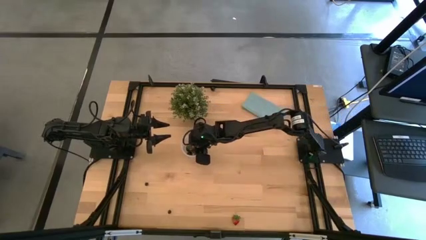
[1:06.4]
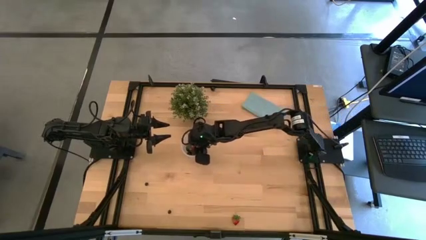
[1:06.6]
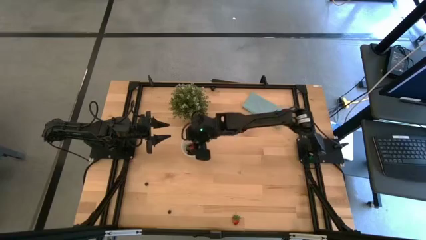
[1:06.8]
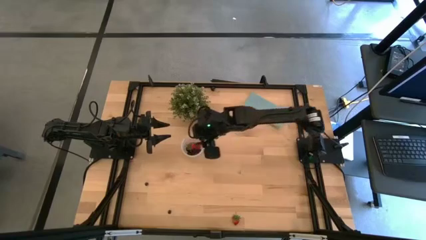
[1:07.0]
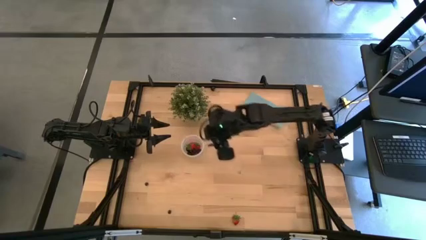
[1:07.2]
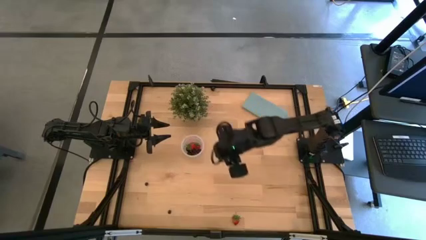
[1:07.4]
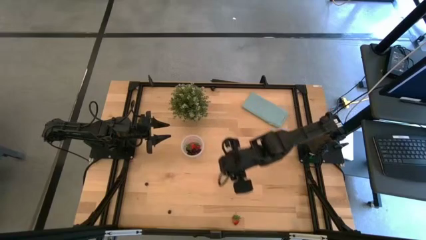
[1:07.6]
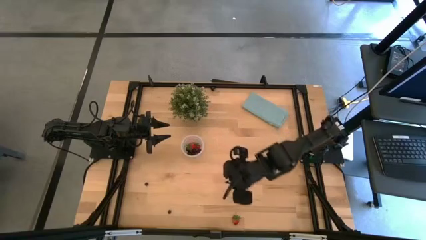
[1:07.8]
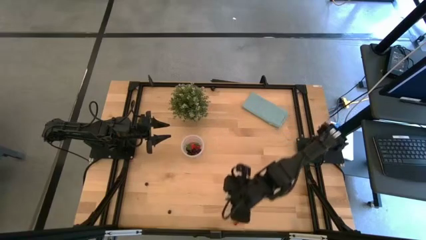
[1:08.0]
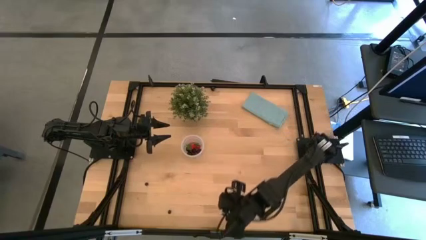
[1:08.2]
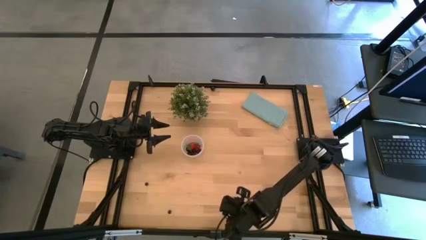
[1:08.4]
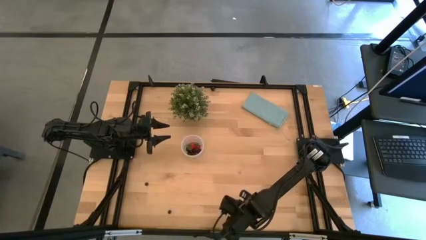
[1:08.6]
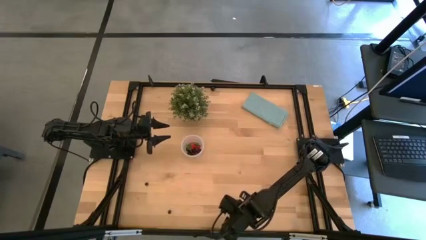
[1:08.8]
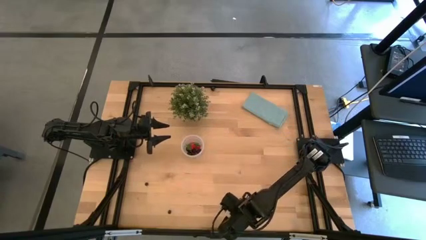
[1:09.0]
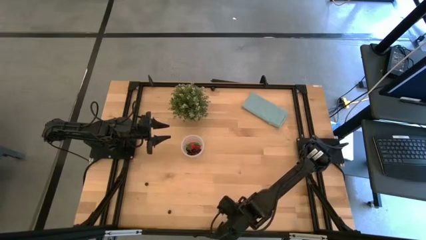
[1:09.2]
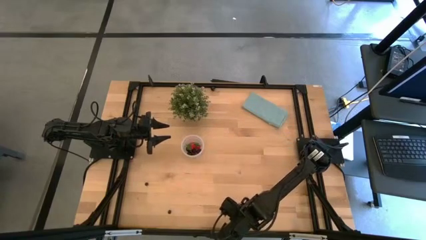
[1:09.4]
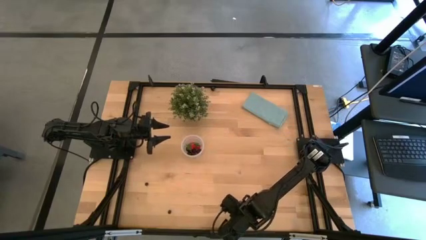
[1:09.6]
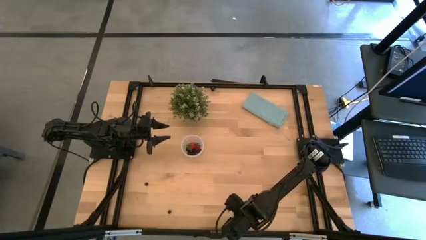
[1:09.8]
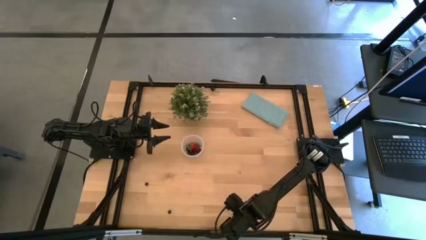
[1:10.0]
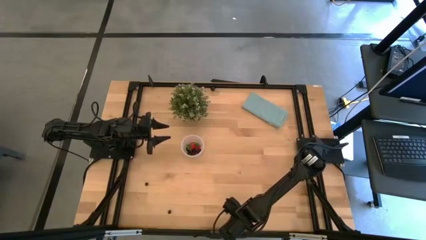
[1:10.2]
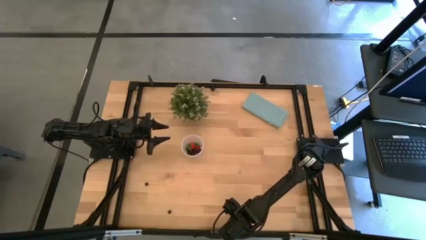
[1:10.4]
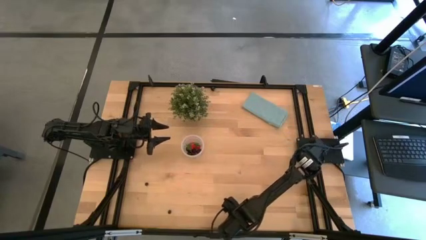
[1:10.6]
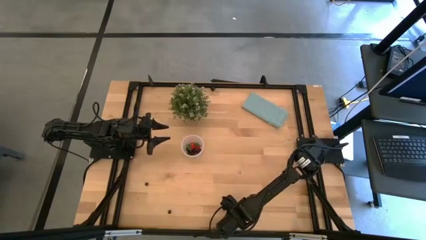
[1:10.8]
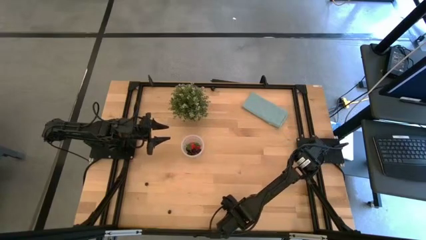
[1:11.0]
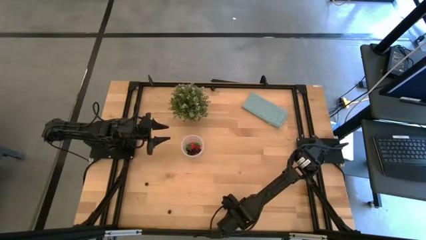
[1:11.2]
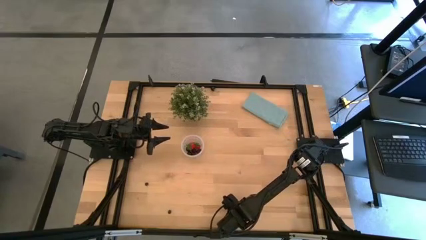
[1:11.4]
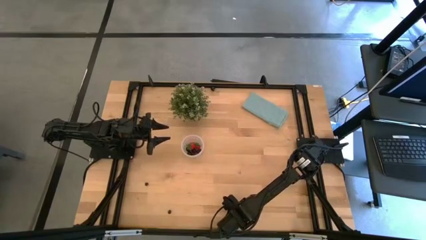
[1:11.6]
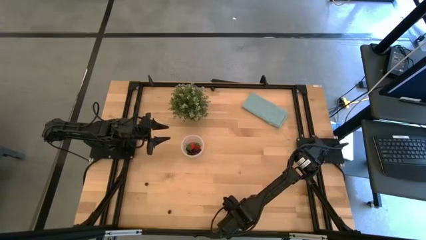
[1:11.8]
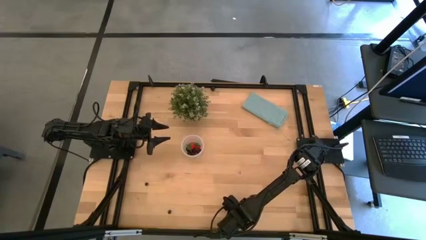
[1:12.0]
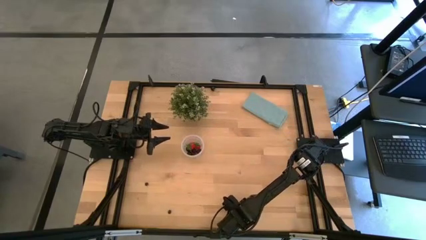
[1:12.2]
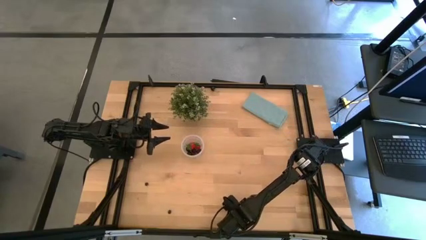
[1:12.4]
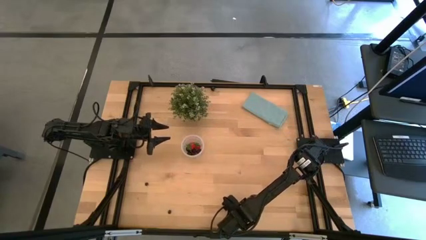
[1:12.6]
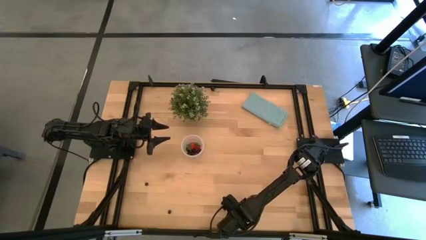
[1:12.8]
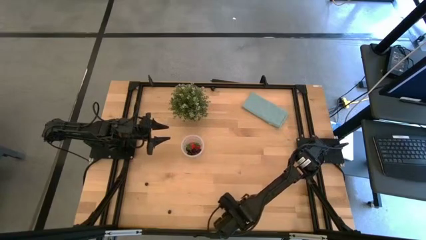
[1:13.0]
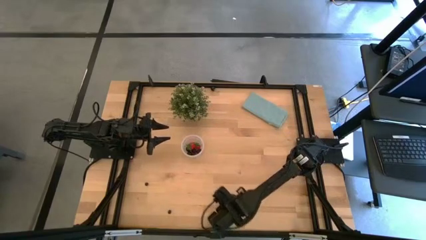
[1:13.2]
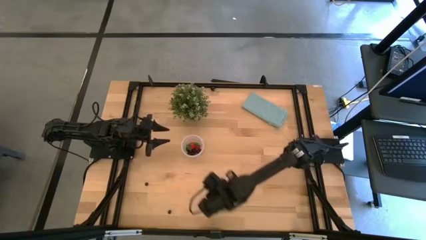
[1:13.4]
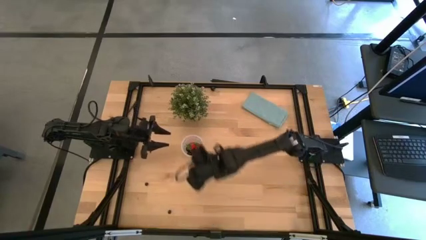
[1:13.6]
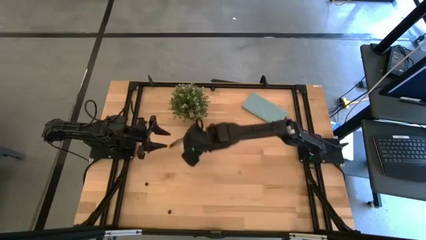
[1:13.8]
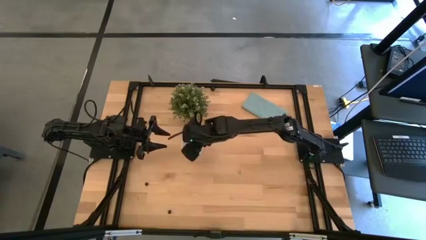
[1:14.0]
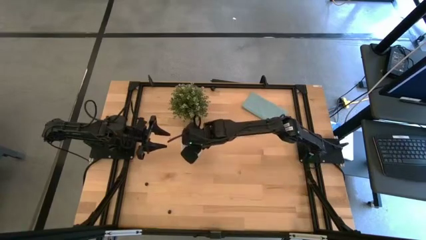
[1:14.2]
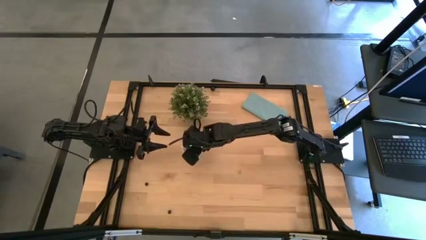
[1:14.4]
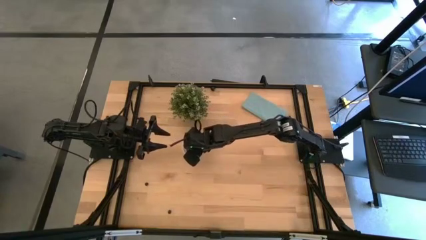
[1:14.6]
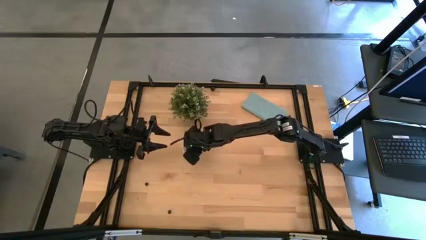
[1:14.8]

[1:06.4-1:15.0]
Task: Pick and placing Produce into tupperware
Put the red strawberry into the transparent container

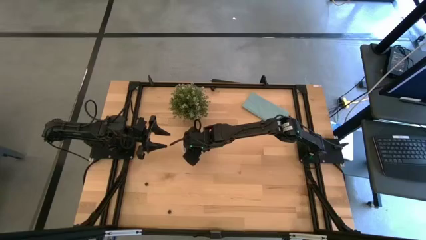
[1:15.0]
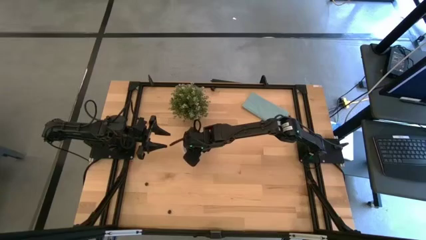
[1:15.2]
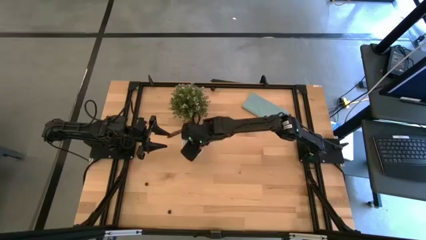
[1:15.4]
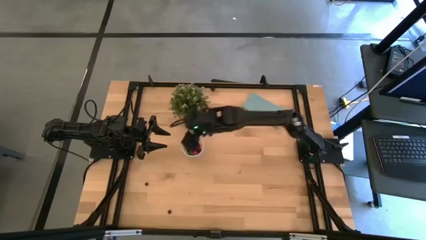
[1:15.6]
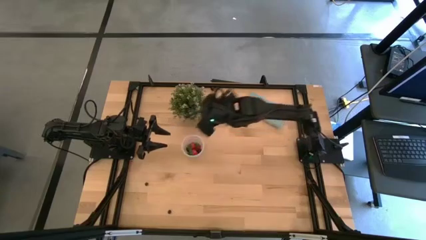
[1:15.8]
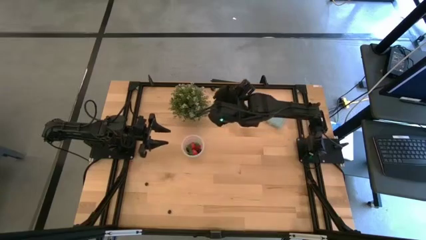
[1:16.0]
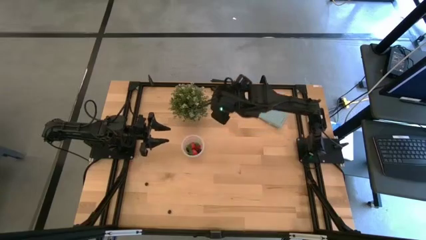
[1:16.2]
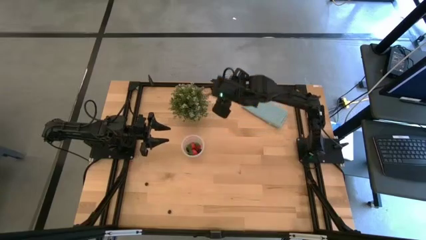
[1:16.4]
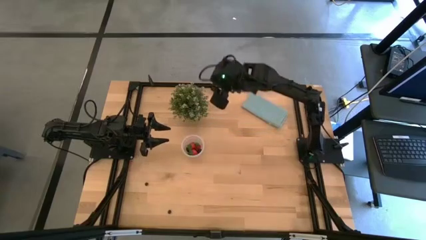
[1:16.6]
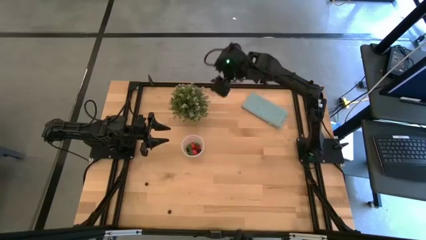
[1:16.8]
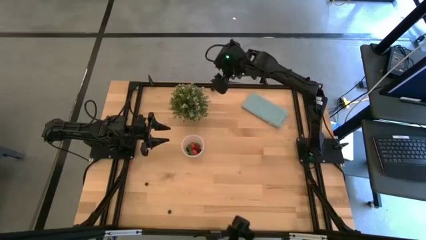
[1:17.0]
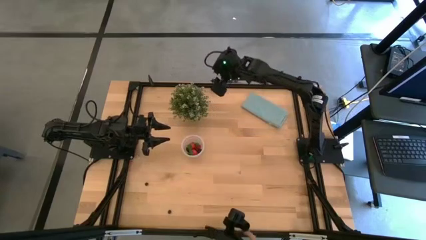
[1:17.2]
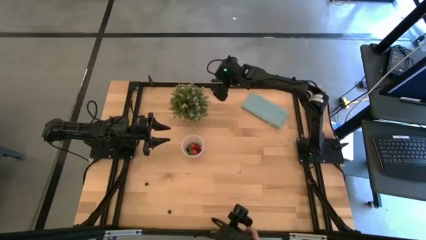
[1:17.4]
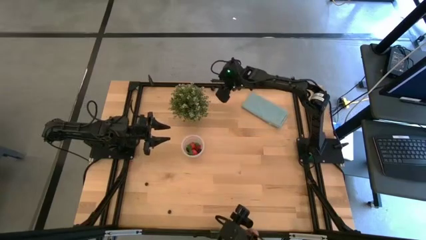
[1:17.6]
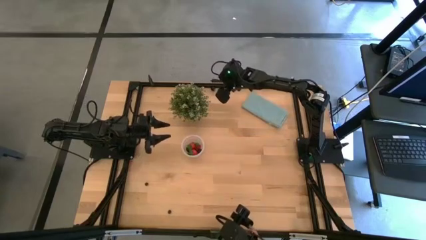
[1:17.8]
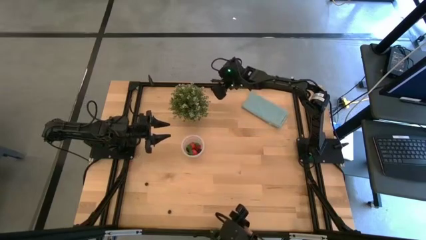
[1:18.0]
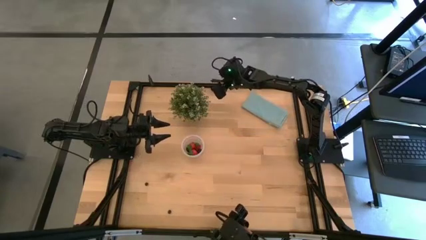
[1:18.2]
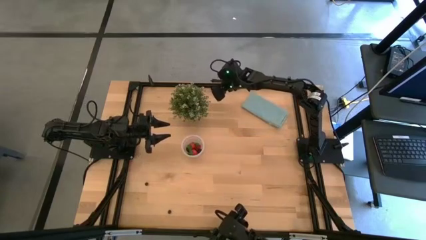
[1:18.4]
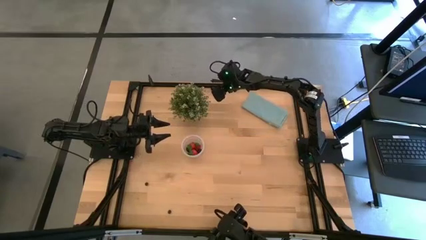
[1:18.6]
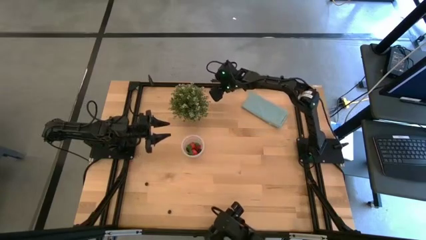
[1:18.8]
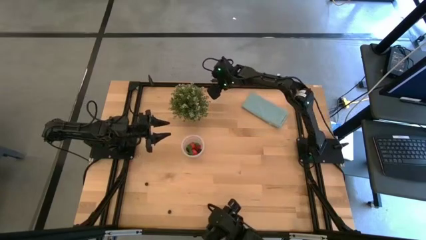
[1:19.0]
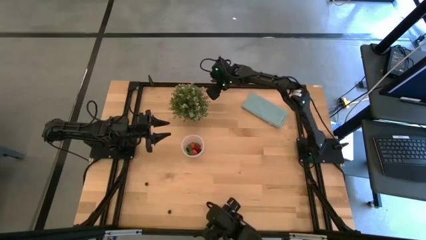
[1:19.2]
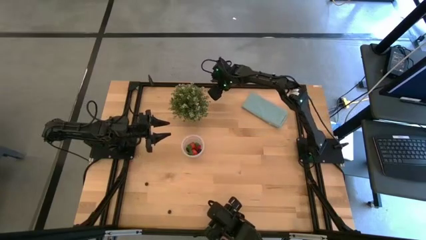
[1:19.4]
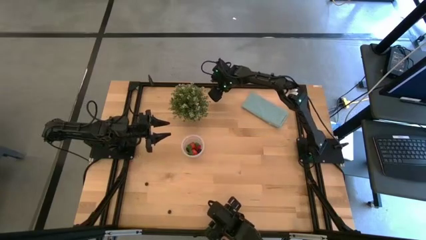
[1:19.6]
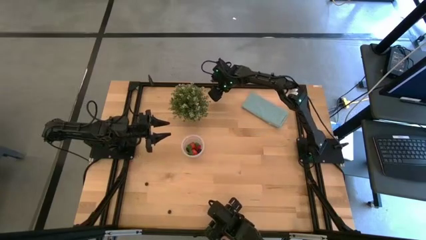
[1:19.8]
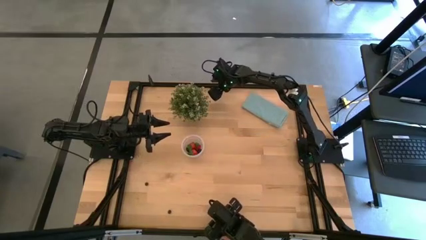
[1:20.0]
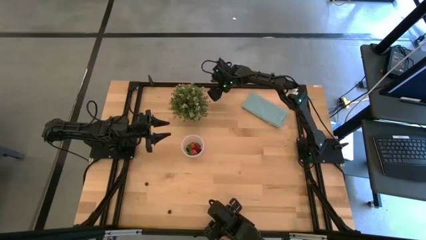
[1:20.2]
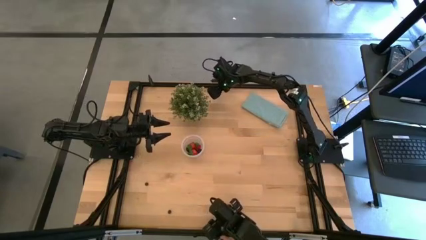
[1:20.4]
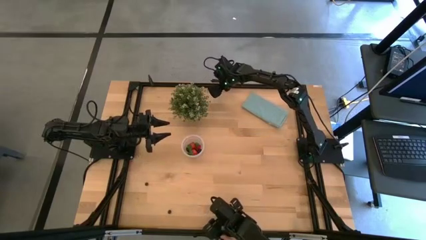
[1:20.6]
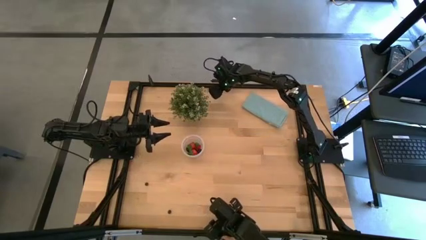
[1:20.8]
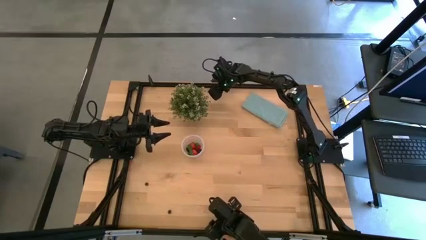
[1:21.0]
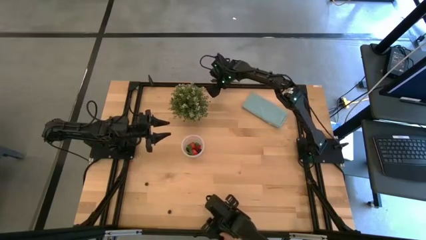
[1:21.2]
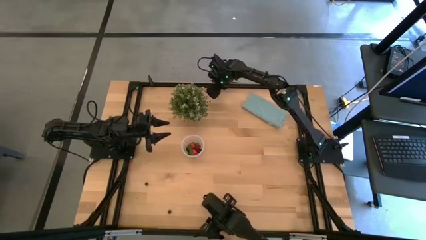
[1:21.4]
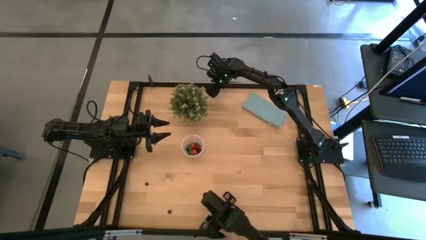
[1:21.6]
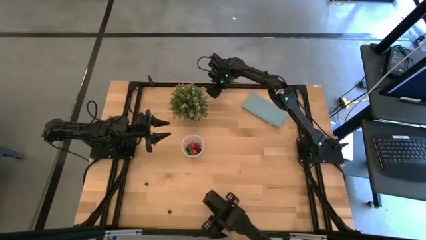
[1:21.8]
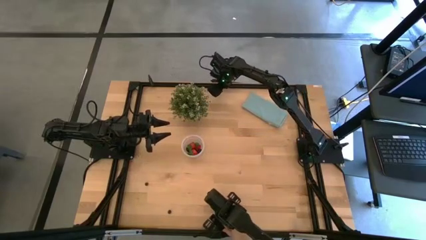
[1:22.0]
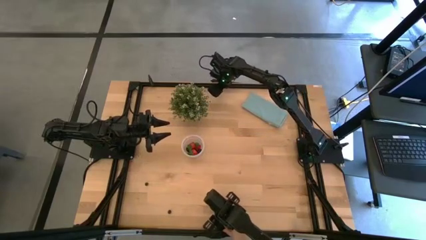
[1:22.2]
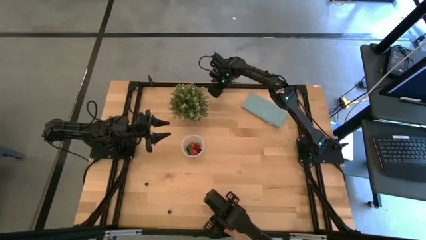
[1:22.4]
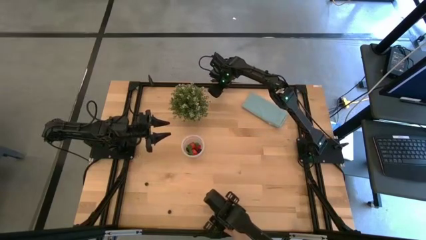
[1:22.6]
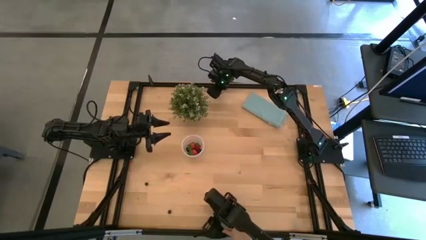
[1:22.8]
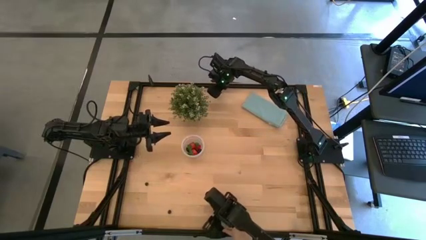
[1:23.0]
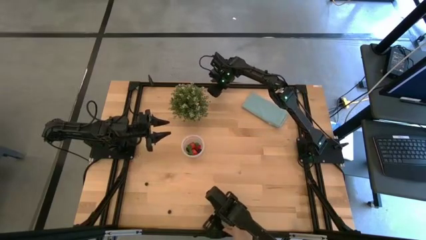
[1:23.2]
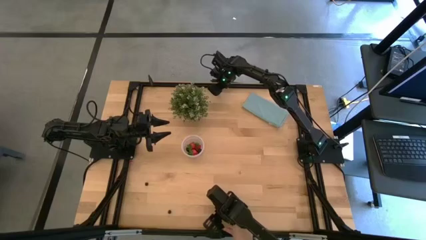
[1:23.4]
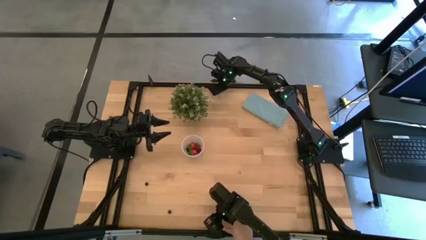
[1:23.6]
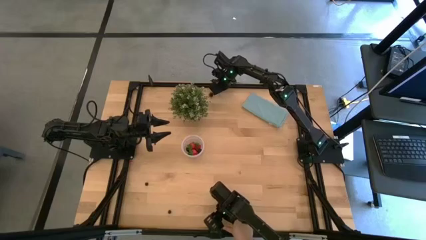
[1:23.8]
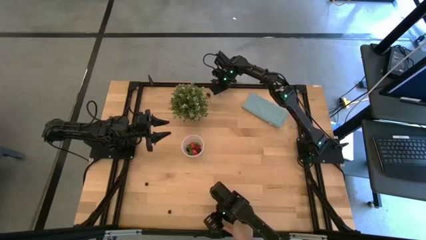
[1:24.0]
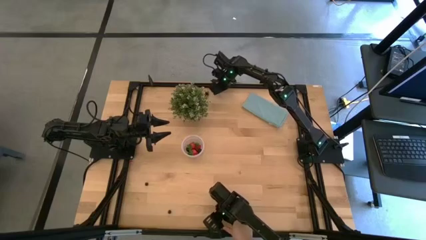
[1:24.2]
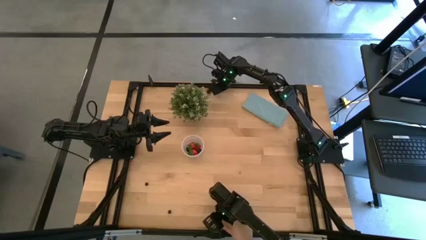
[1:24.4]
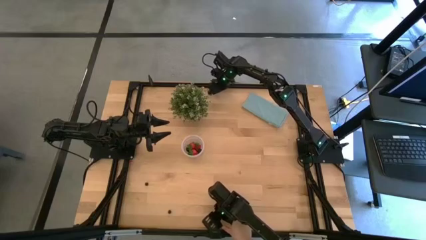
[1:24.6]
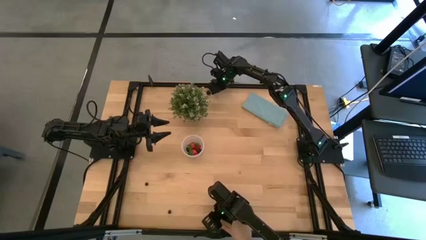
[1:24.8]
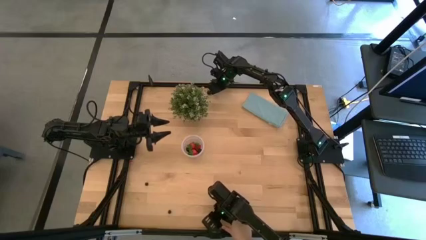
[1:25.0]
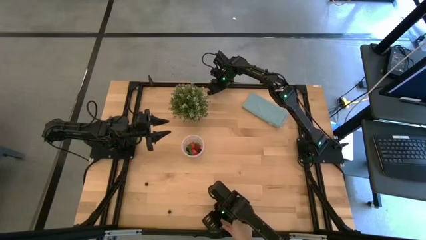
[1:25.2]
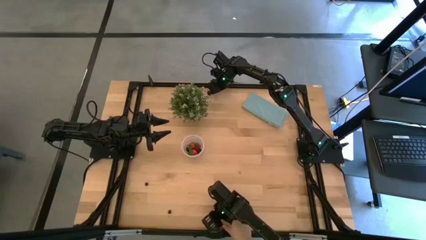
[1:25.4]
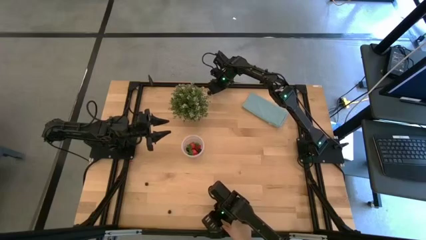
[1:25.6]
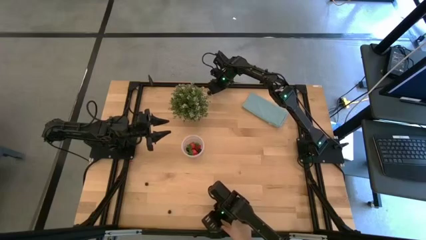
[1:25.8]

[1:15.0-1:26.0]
Put the black cherry into the transparent container
